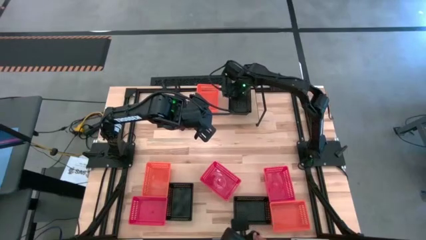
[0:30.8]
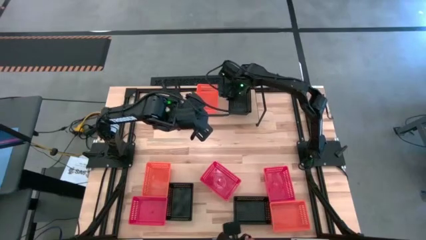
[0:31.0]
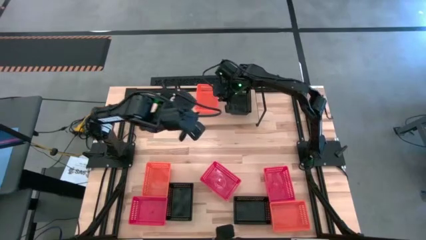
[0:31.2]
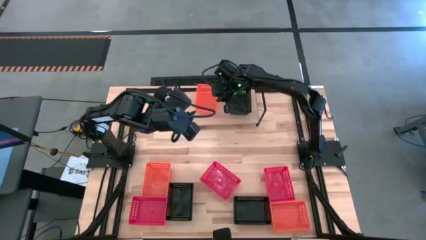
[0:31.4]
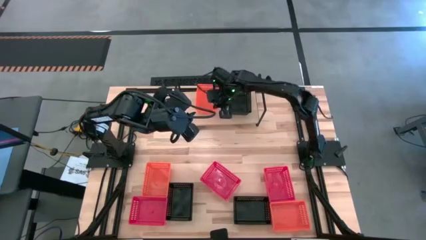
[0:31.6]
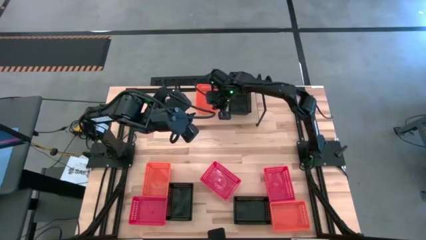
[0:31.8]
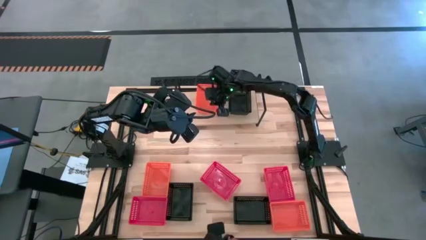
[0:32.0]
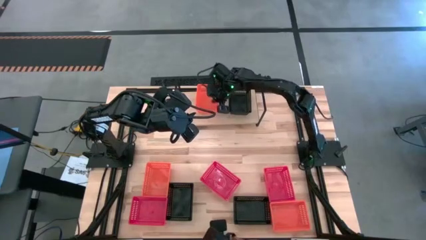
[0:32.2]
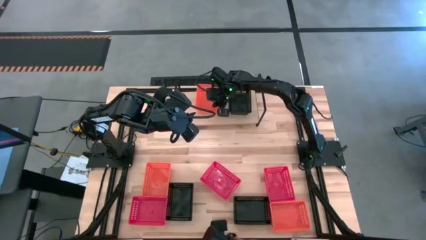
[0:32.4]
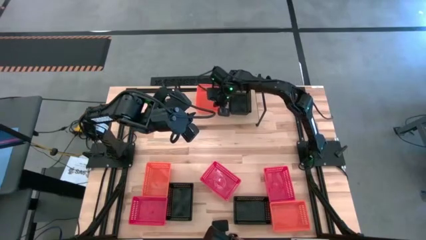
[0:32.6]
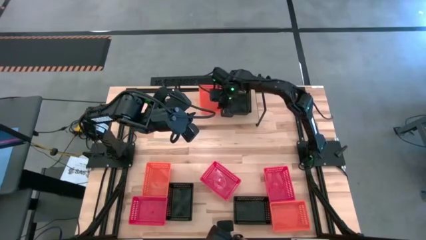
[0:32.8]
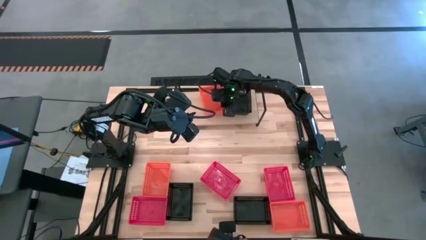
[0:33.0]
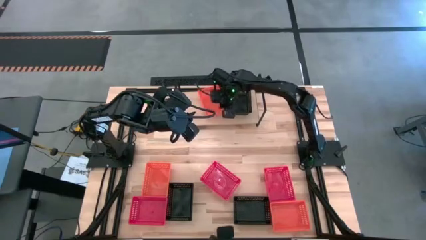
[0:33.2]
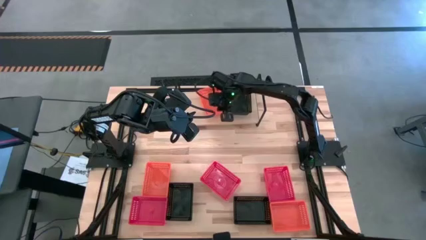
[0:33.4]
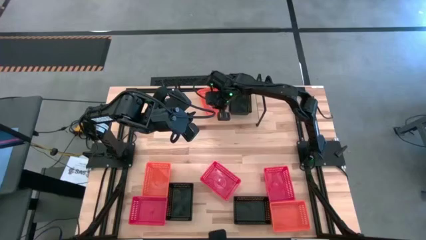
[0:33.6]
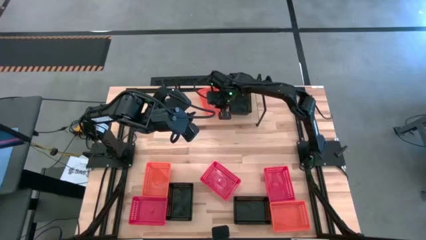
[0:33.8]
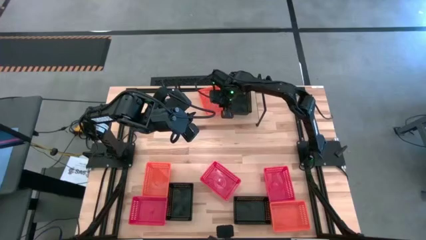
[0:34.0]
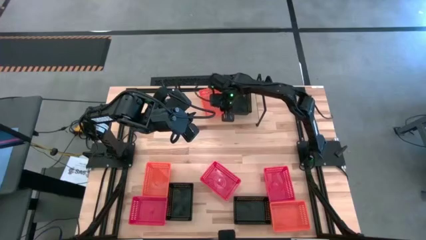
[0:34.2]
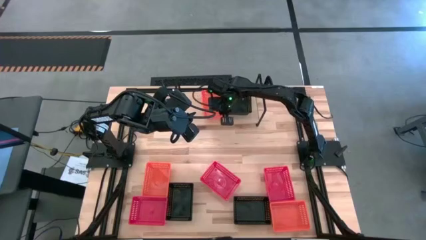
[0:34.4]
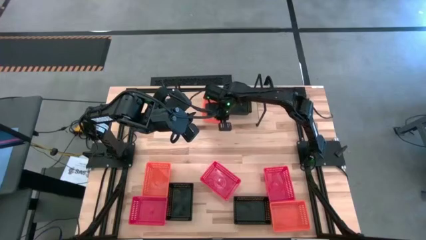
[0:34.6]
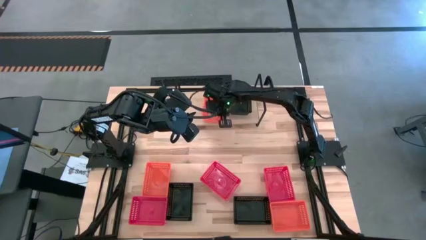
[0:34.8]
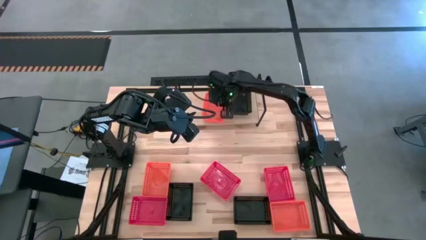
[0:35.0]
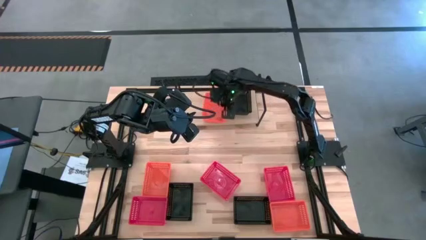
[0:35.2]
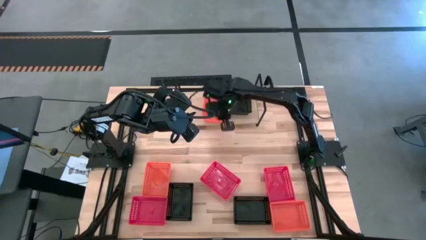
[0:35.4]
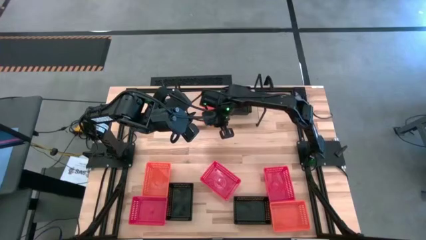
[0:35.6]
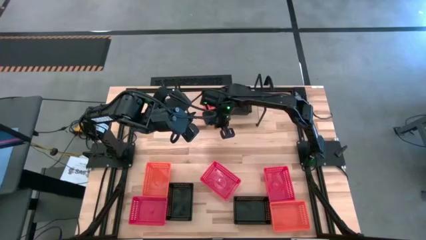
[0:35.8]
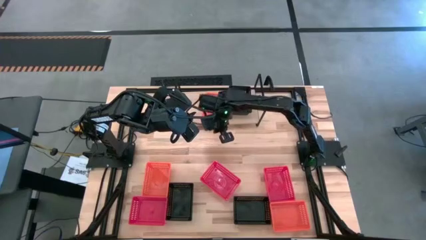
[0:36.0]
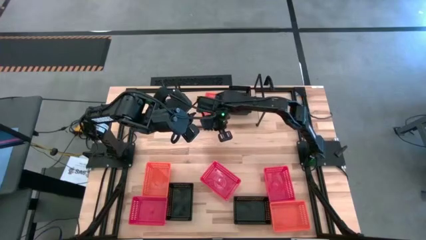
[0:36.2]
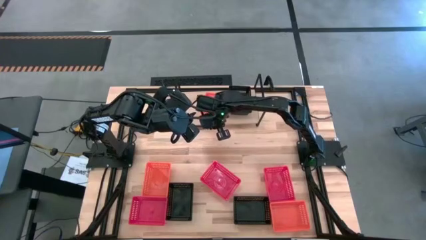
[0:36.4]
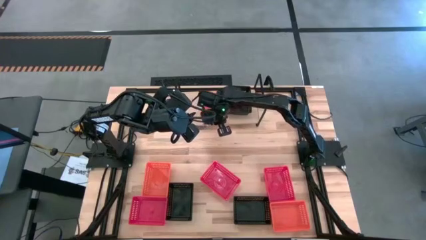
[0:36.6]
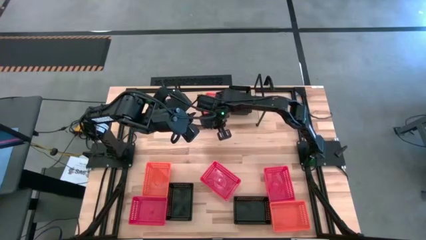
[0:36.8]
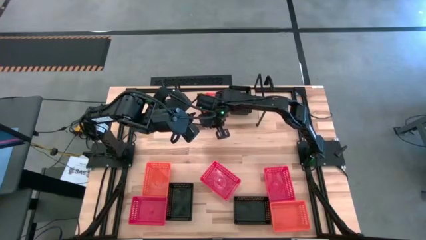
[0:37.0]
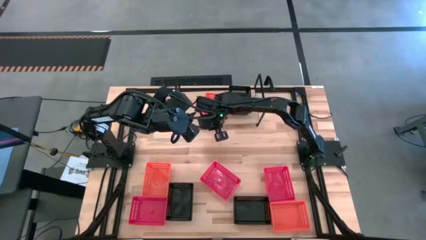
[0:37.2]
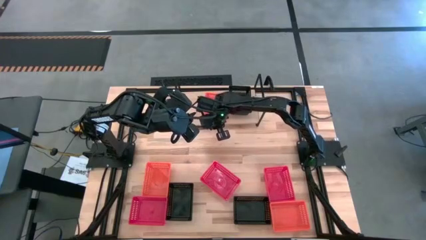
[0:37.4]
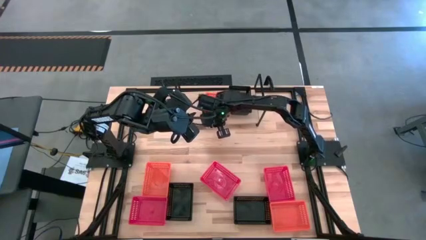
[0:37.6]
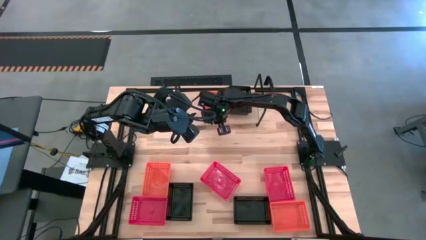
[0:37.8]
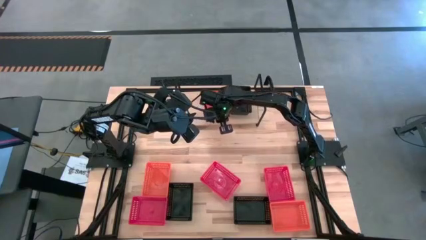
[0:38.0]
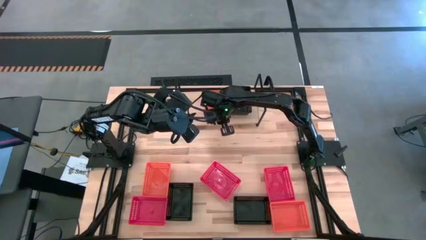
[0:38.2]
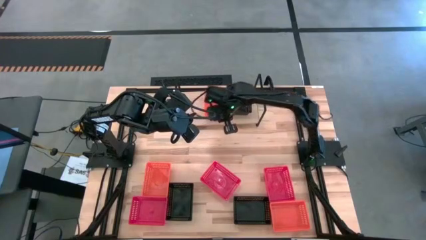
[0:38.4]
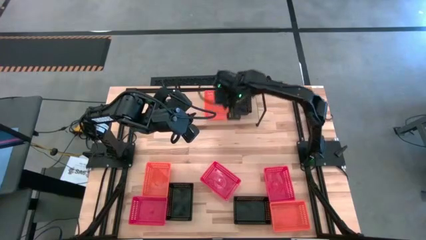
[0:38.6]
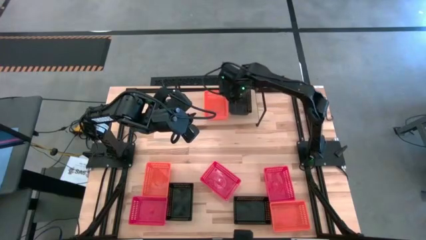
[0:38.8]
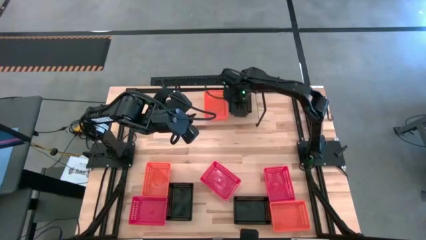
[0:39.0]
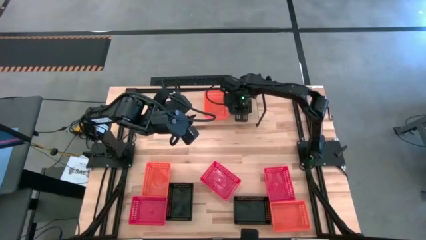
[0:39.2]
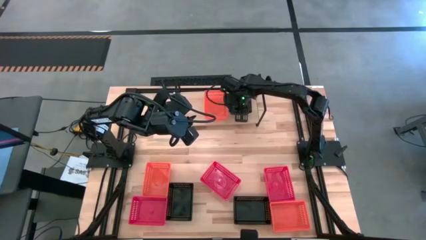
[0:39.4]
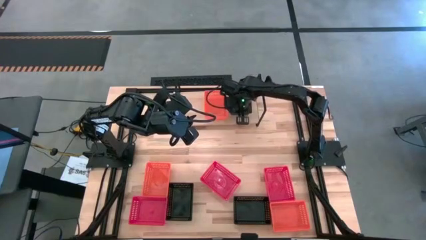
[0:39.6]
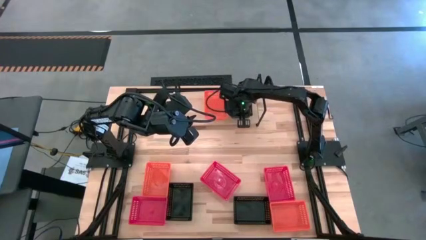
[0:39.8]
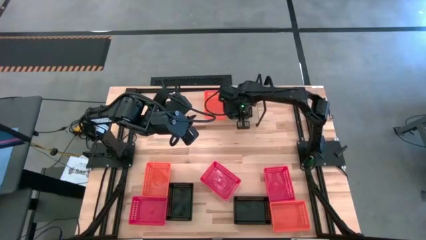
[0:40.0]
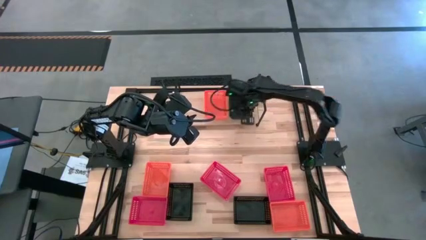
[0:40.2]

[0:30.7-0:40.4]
Task: Stack baskets on shelf by color
Adjust the bins on the shelf
